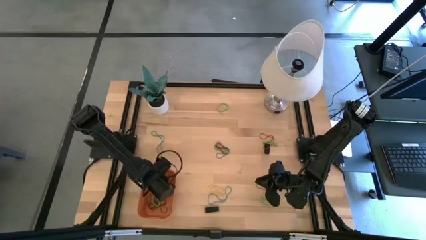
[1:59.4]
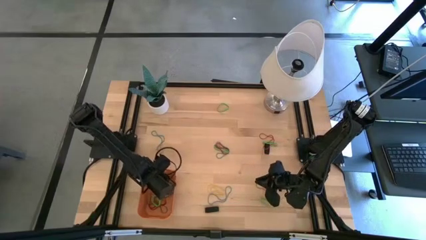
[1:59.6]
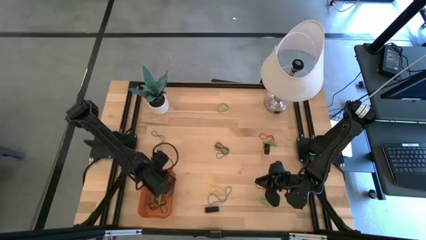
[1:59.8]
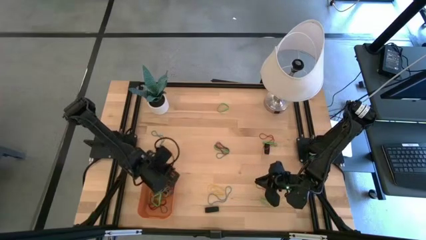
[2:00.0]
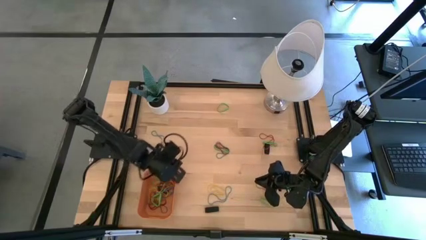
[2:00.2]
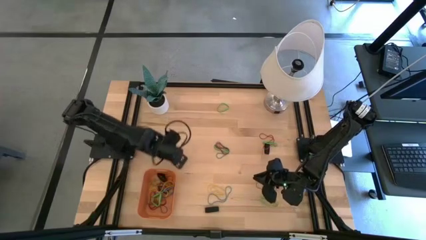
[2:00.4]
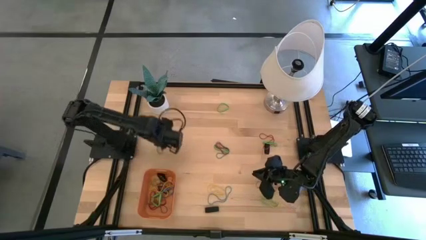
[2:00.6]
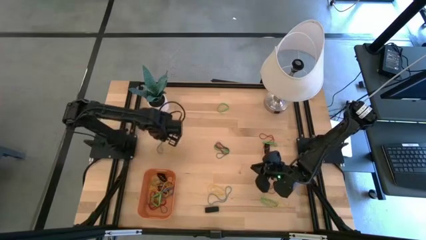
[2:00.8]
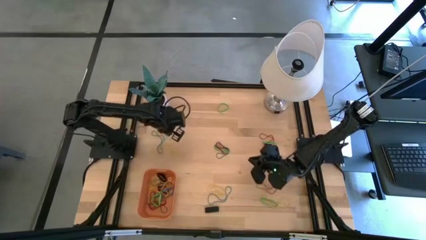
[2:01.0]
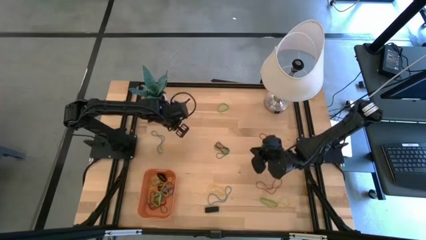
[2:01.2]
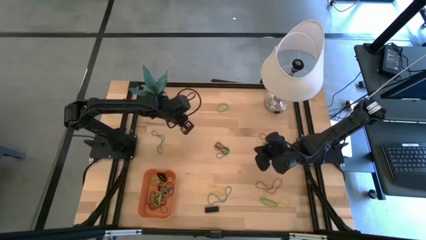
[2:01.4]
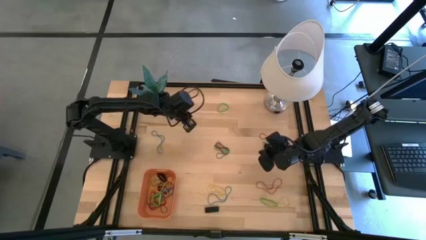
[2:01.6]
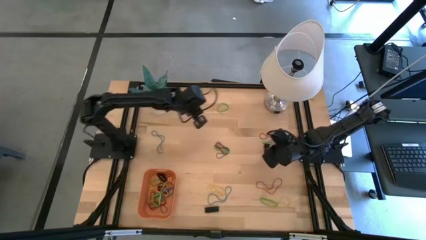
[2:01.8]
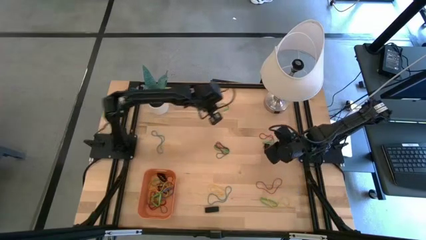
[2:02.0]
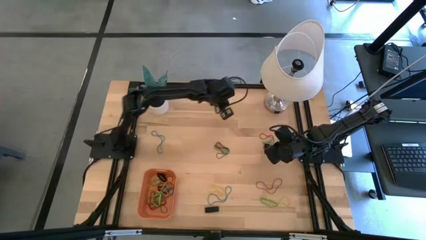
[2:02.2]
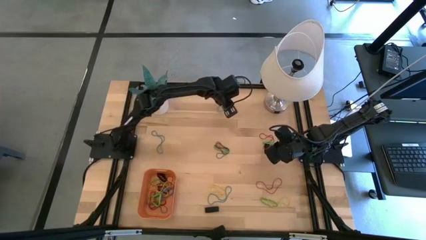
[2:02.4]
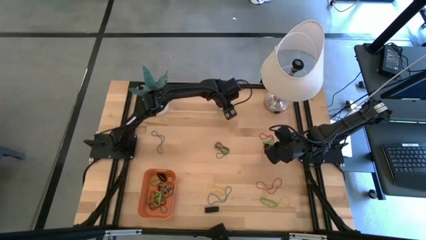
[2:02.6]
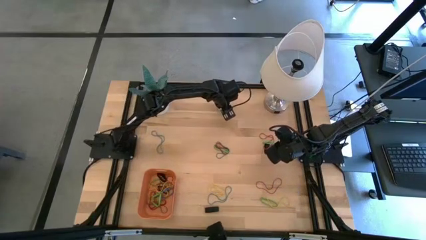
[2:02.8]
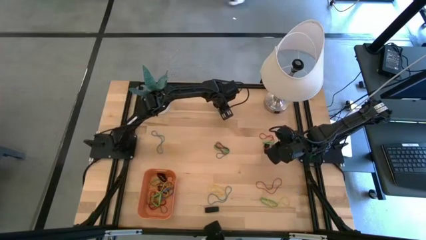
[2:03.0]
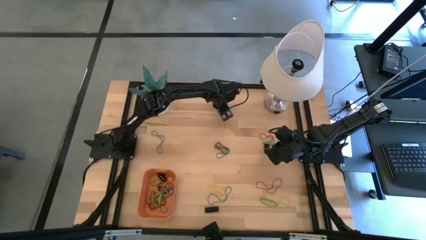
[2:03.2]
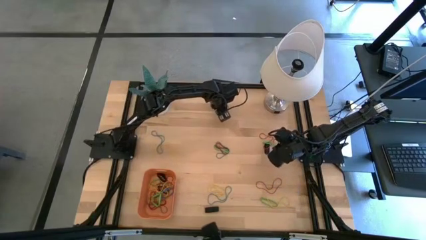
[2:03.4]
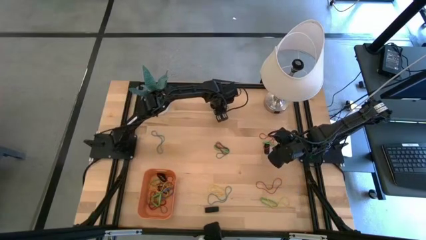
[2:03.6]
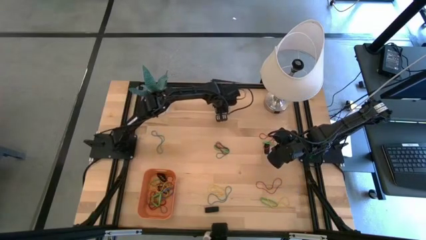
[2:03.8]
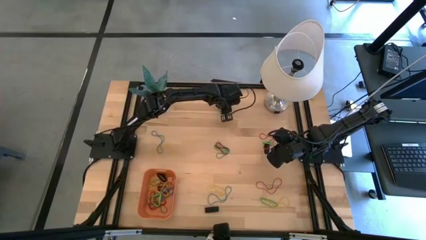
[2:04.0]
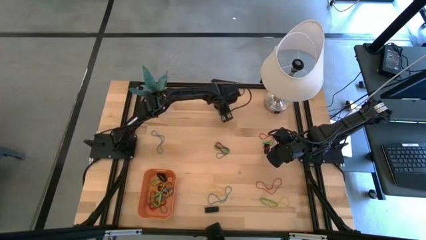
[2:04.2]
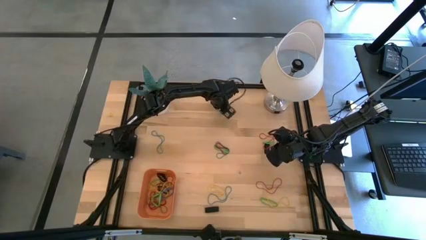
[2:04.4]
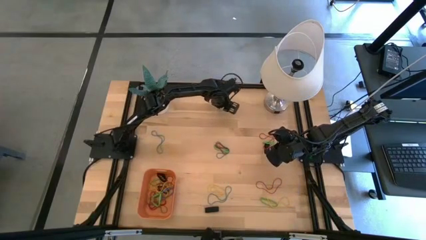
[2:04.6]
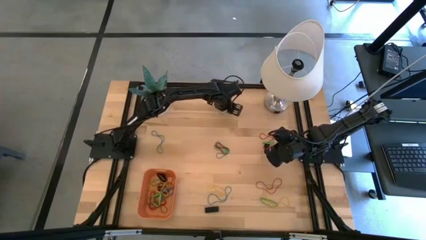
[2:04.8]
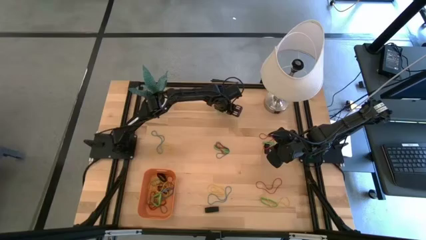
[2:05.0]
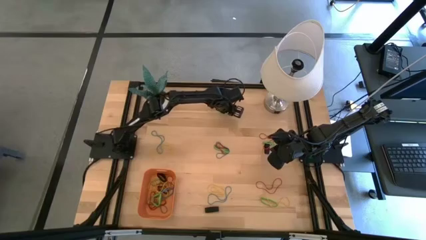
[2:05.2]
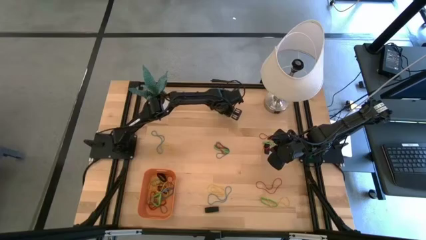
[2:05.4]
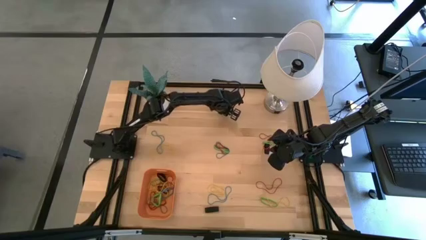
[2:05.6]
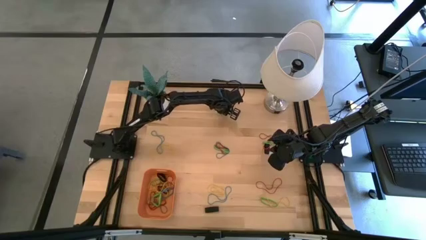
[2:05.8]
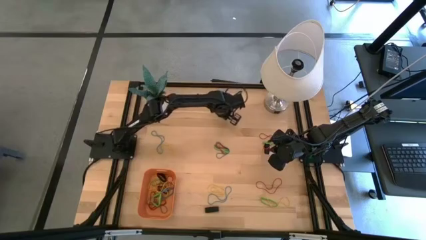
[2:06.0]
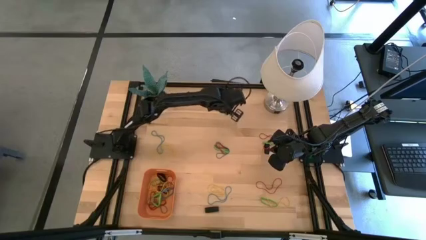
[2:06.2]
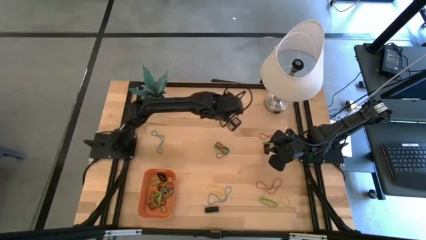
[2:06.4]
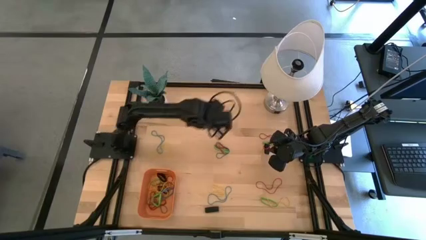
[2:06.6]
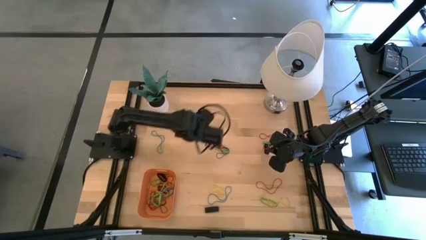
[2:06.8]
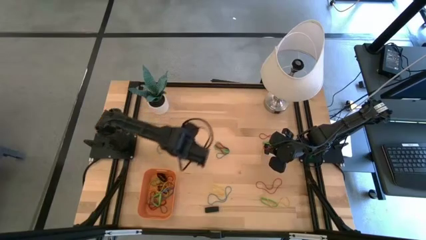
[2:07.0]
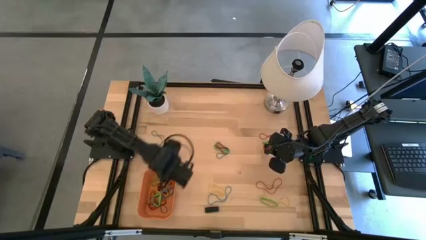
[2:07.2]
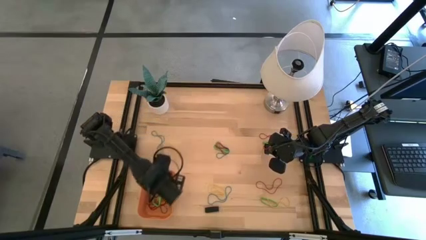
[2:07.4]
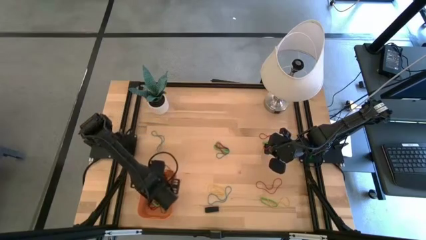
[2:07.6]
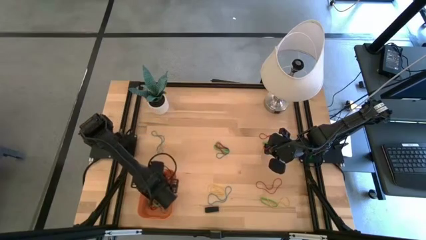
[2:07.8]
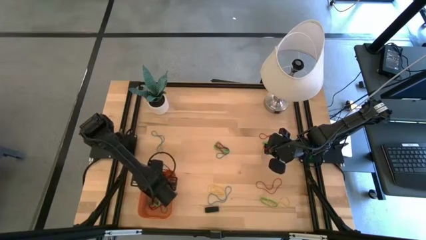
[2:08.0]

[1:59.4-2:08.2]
Task: Pick and place rubber bands into bin
Put the green rubber band into the orange bin

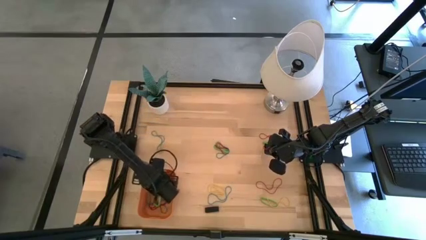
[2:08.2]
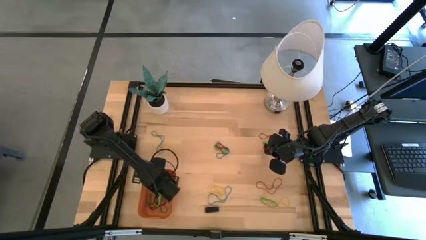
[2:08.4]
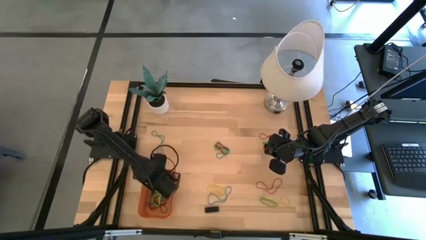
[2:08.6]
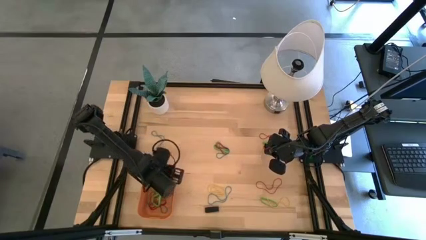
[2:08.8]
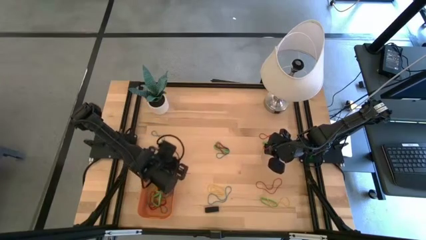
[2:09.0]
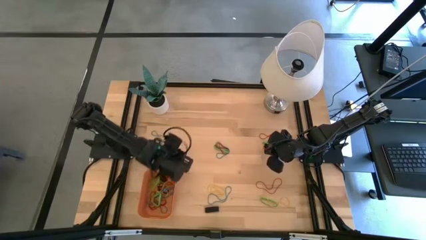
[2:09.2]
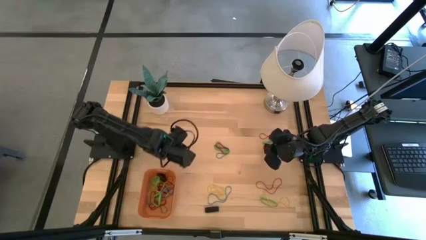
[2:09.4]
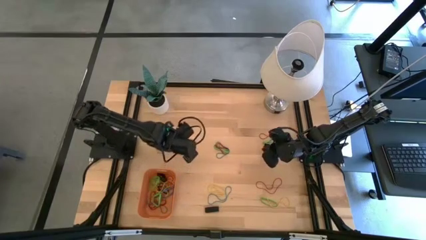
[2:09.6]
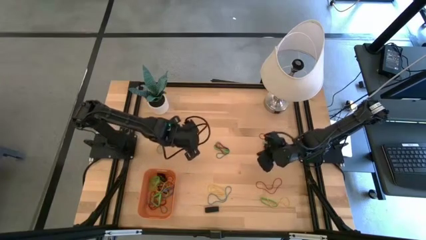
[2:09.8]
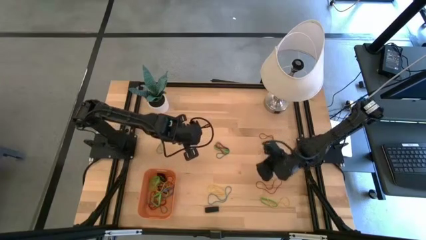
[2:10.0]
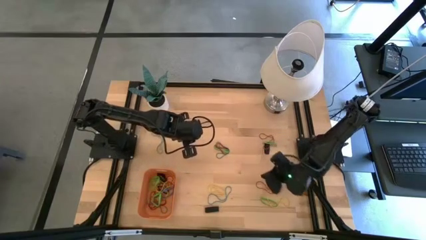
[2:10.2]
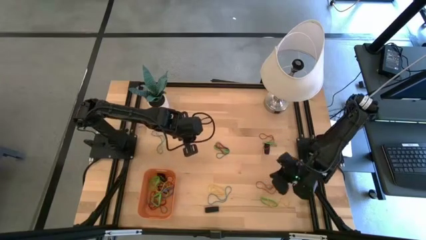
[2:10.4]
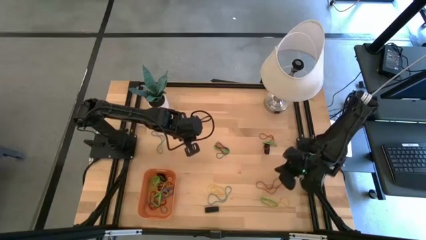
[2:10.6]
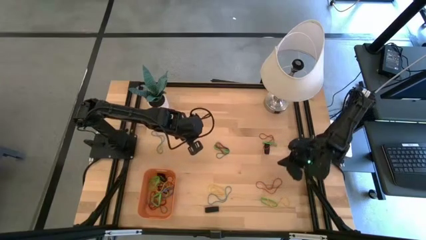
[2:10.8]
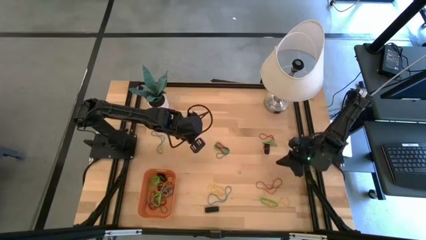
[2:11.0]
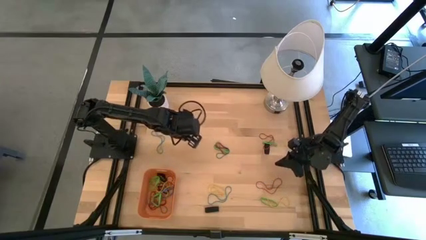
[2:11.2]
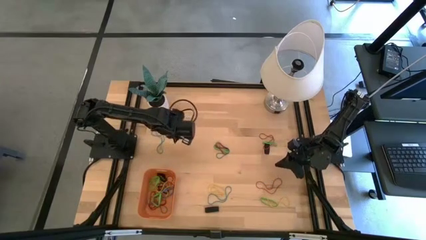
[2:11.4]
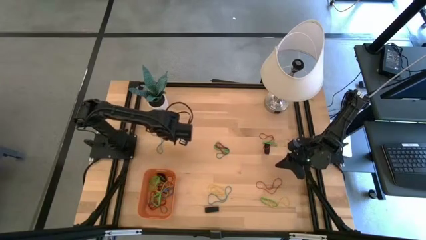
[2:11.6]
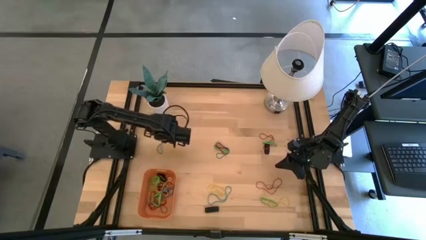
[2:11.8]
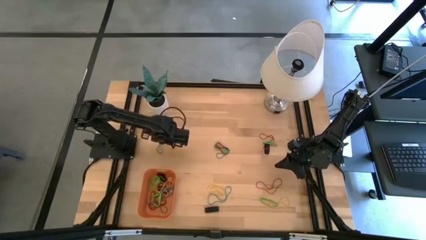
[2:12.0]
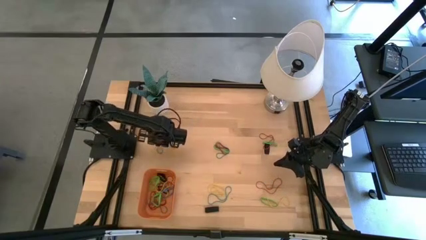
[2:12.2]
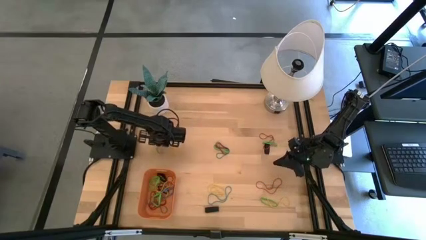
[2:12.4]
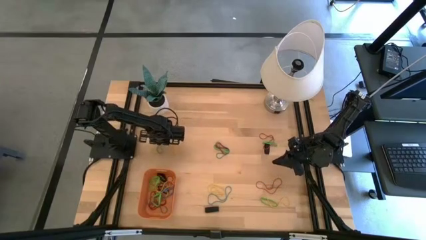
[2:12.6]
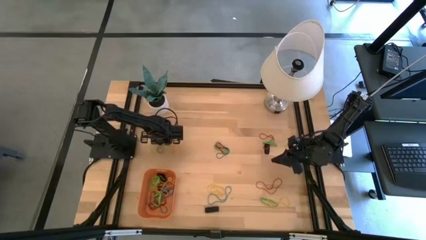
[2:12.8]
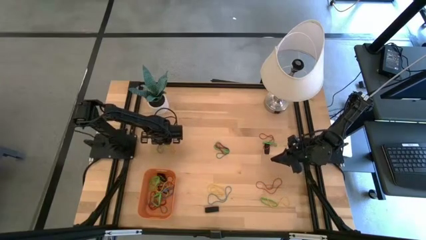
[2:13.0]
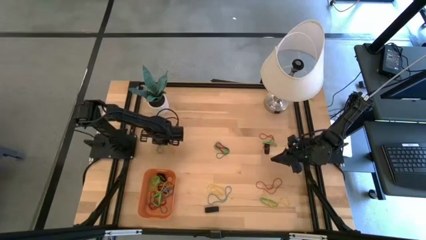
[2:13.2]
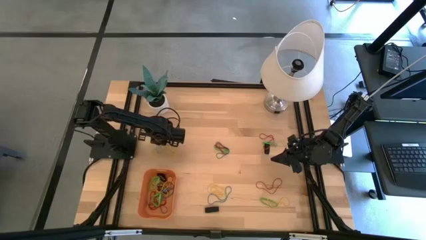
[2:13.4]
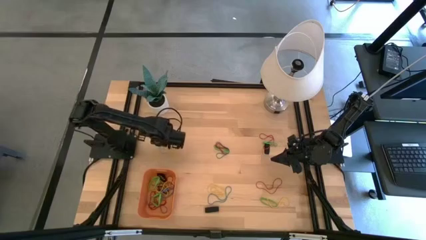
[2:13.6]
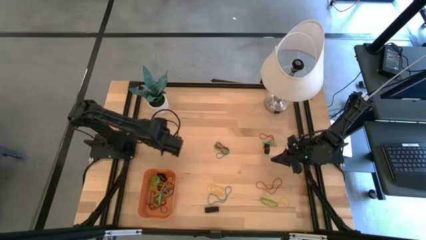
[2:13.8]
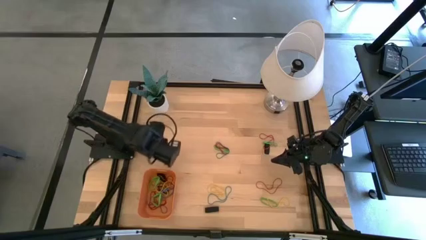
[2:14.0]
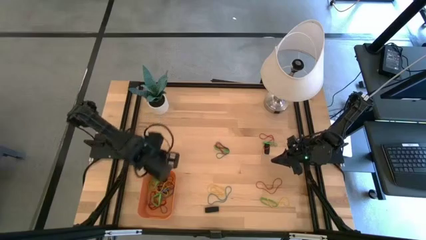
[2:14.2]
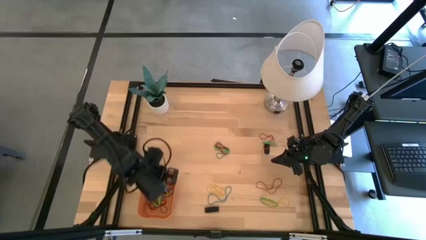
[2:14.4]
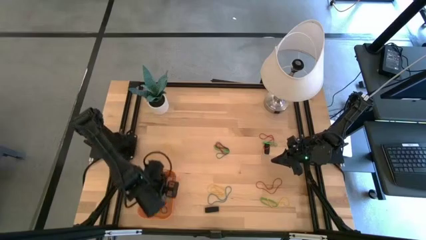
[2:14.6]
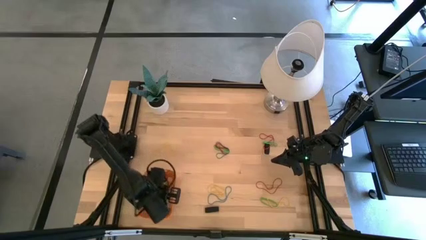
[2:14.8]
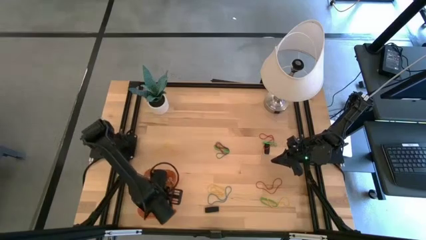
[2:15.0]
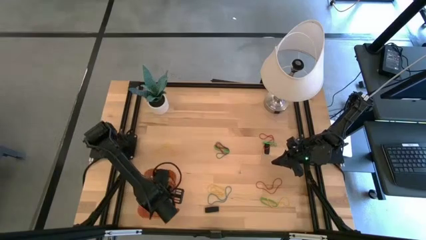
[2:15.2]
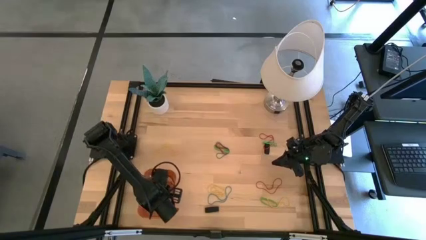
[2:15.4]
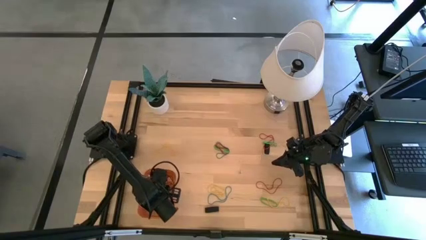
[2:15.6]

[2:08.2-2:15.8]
Put the blue rubber band into the orange bin
